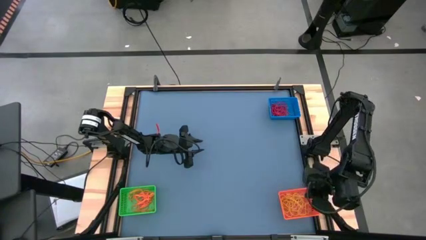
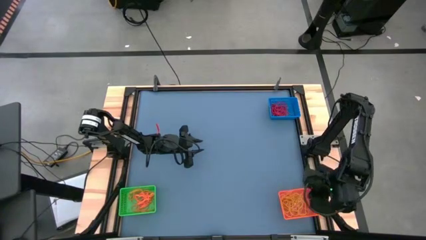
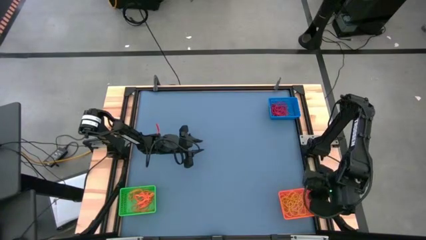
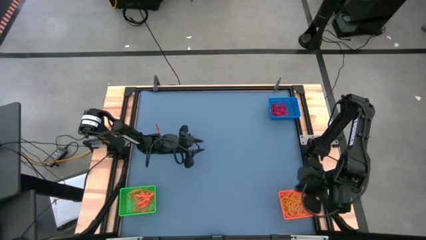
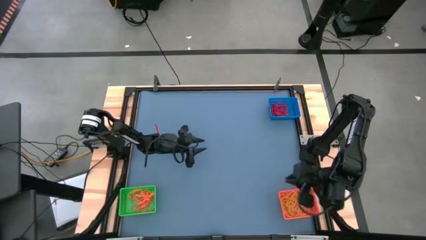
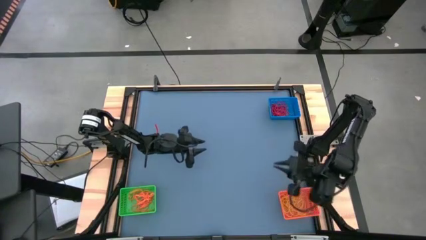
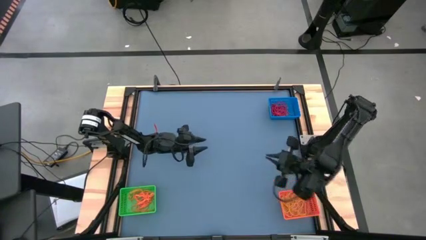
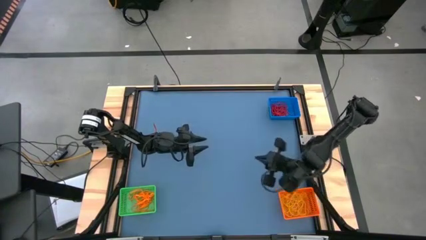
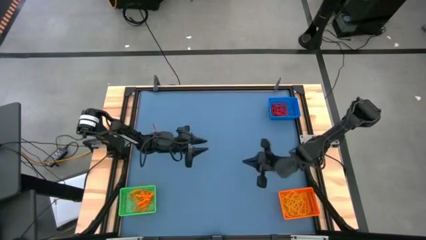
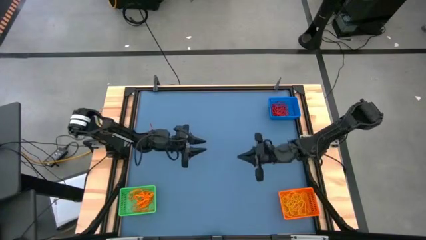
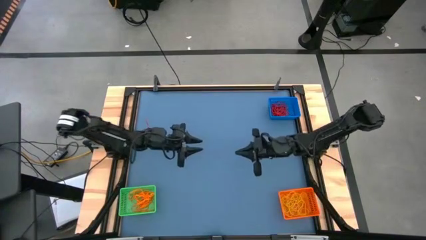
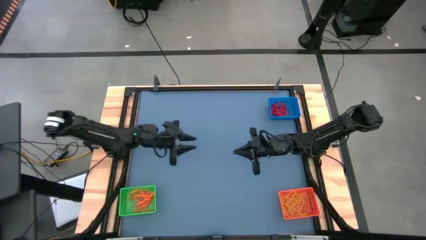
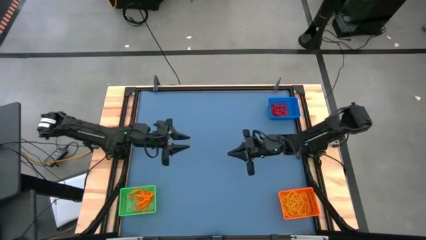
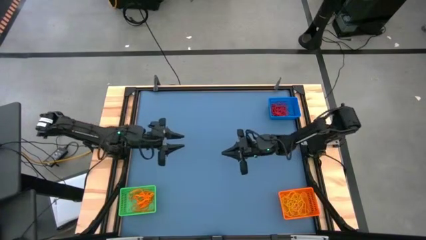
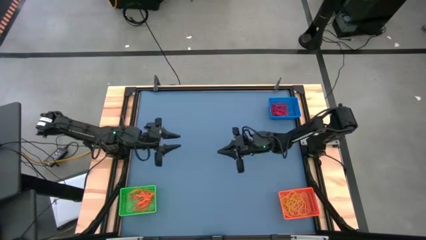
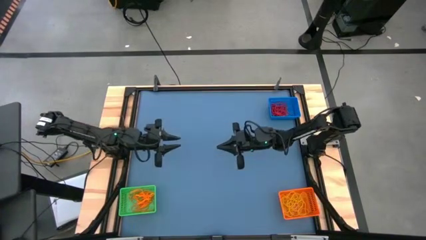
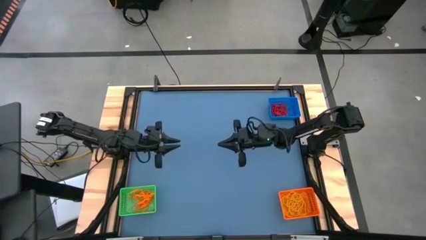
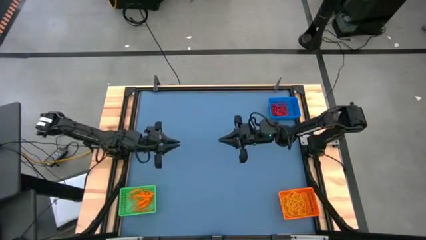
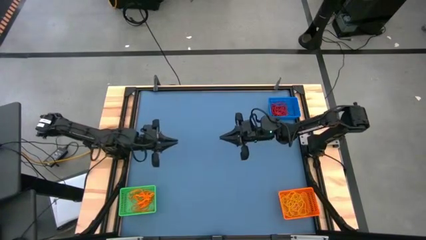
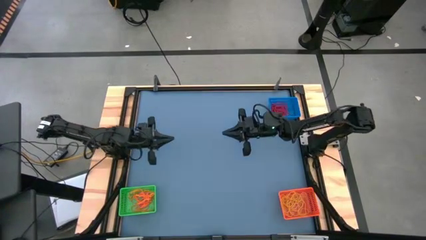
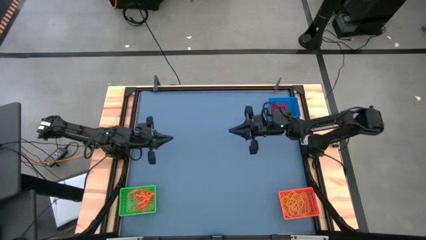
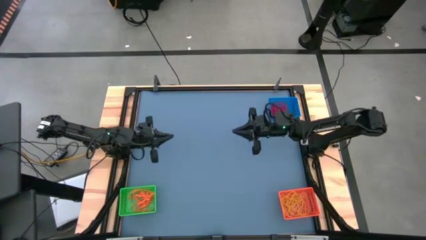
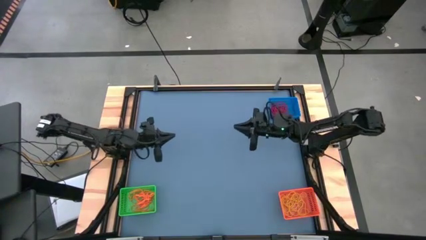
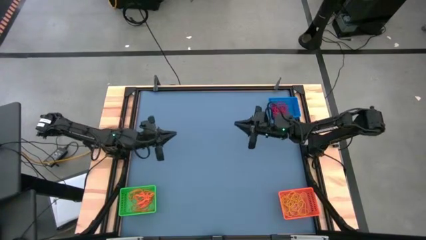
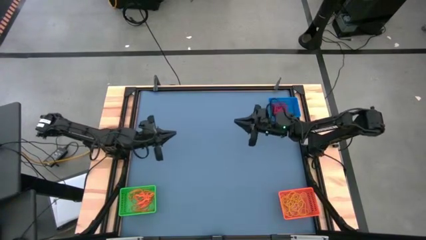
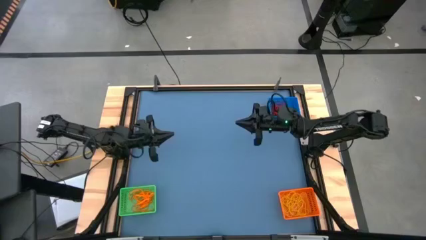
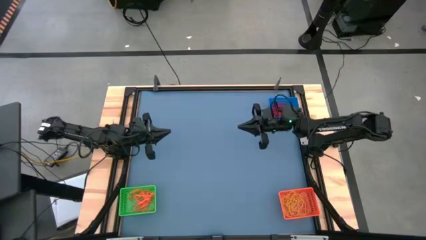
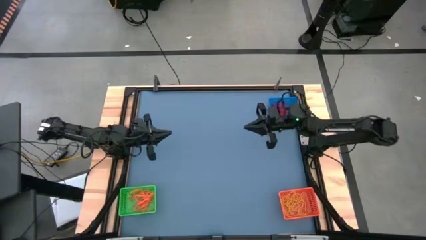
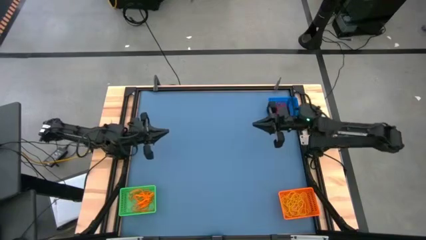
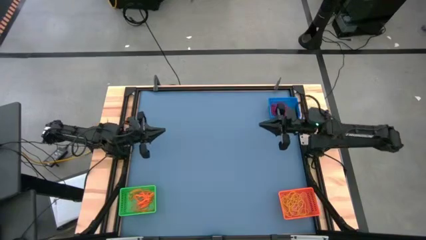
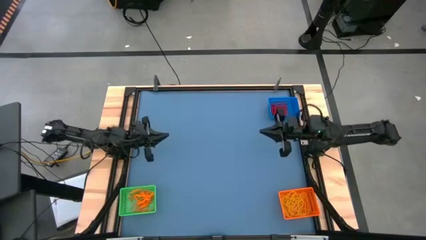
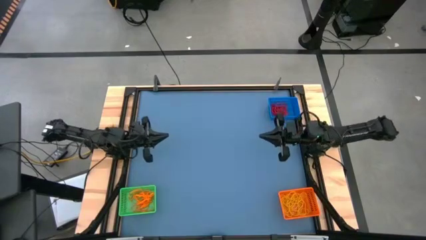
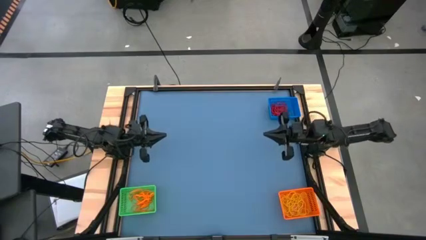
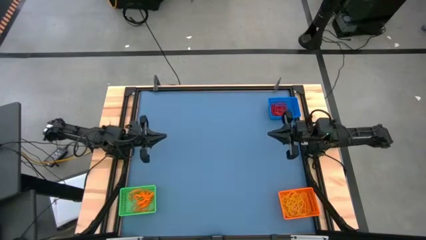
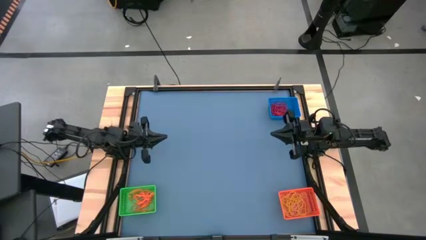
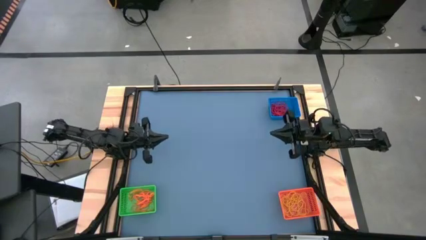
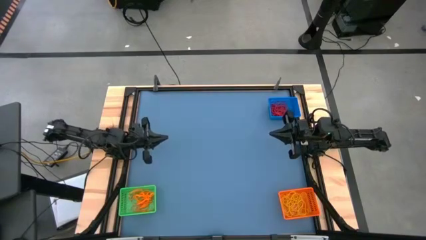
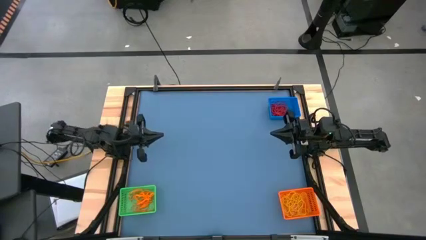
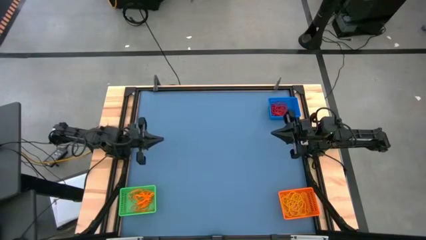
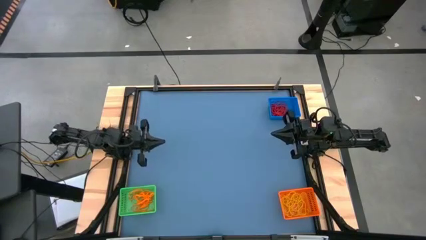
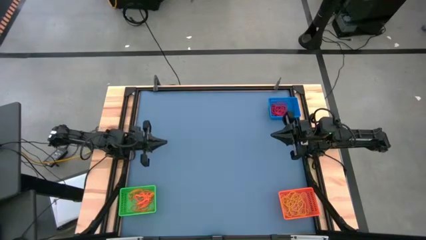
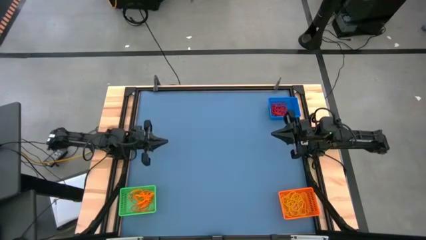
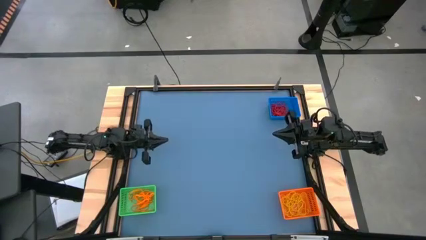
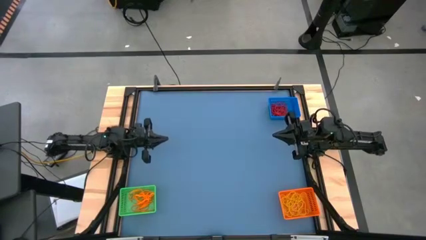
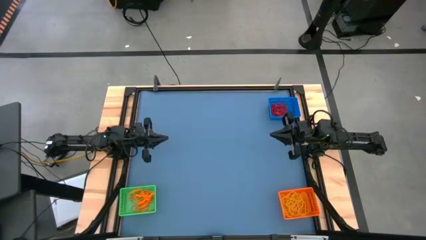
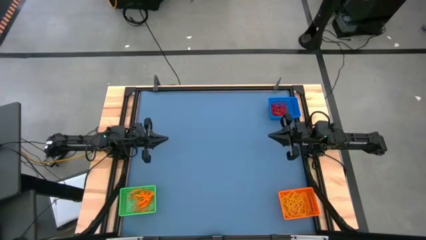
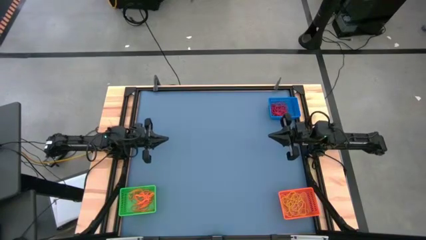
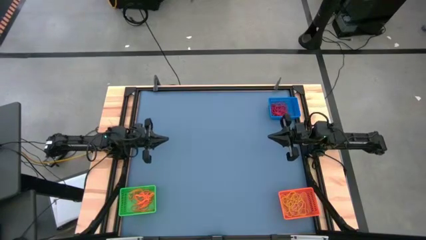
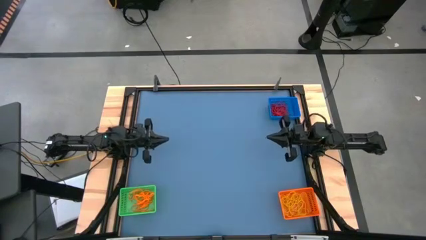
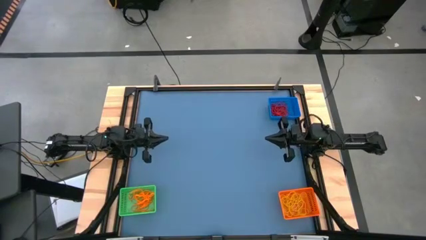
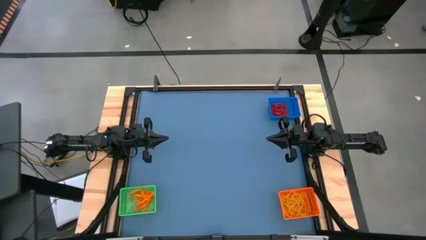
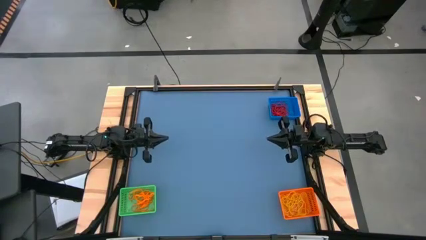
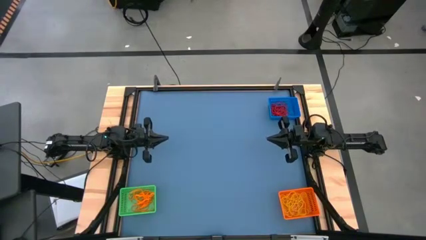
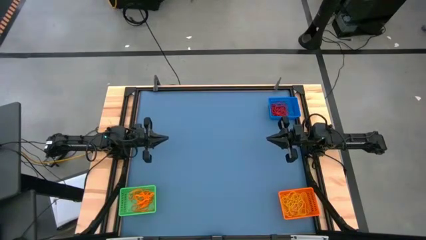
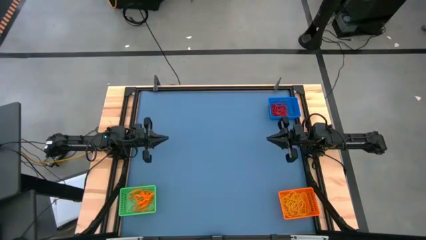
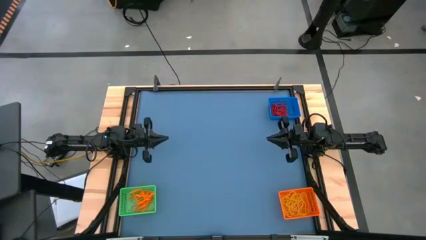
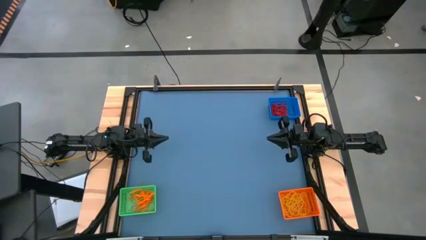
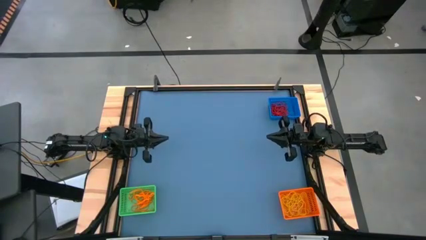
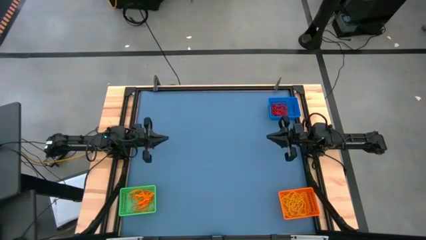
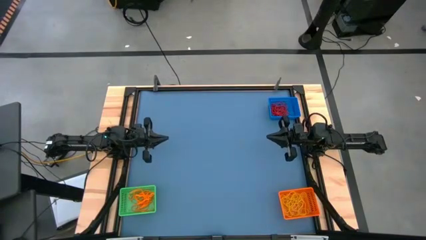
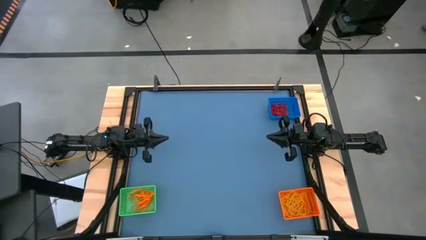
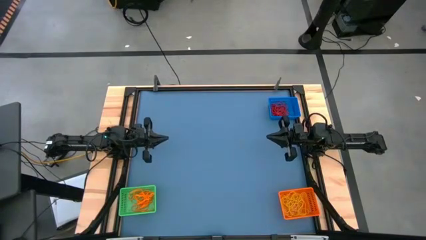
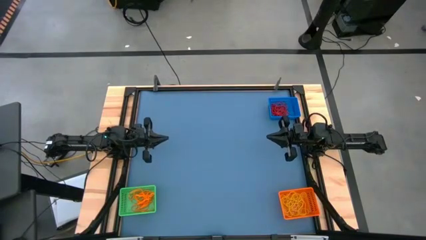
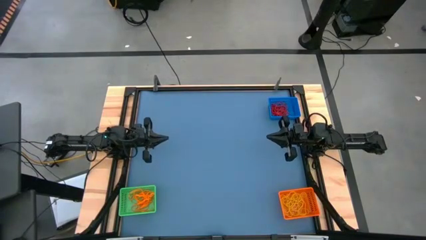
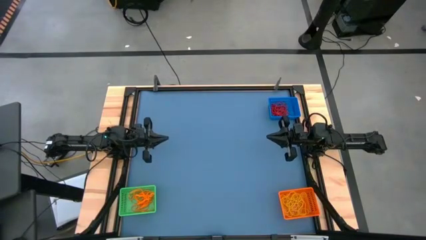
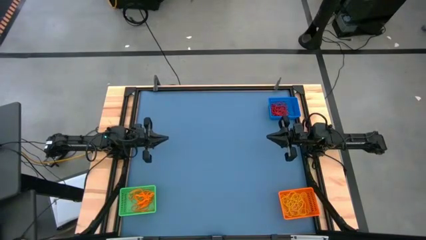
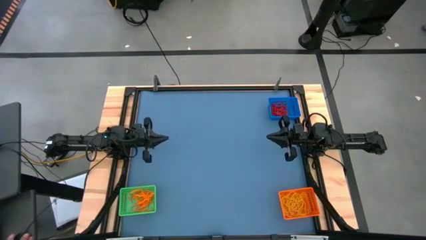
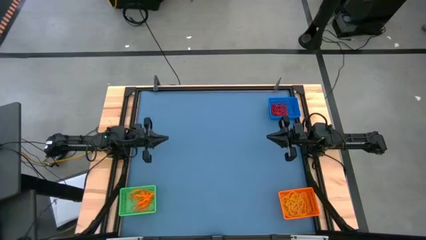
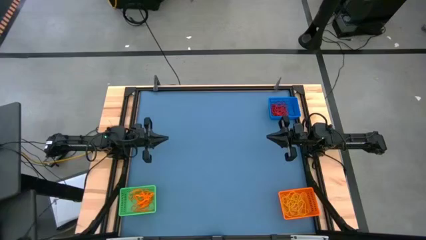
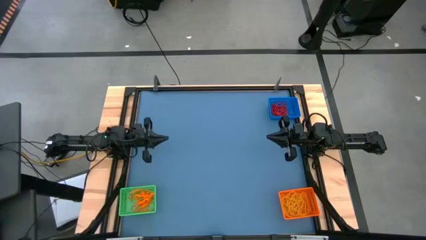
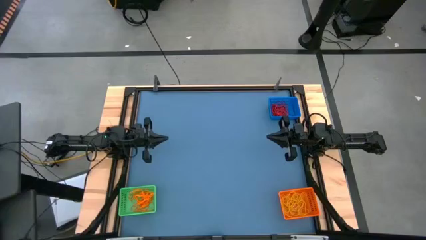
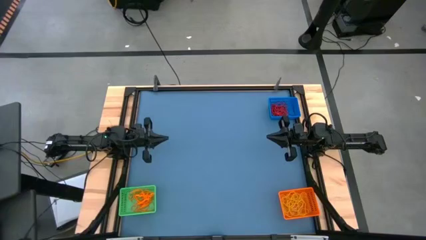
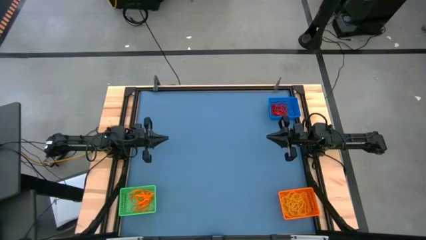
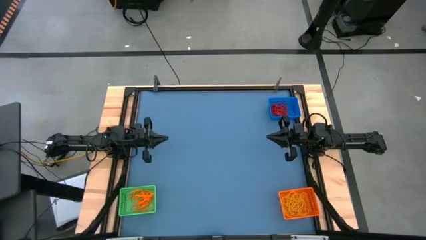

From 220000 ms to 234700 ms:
Task: Sort rubber bands into baskets
Return to Home Position
